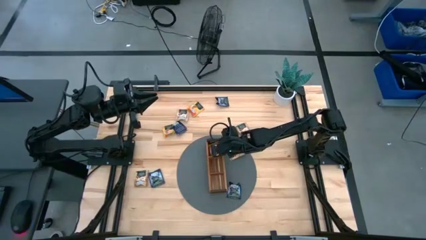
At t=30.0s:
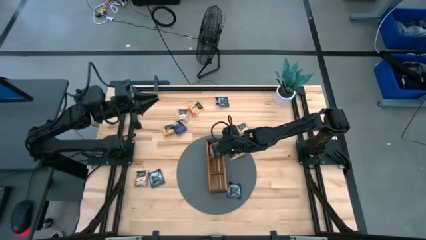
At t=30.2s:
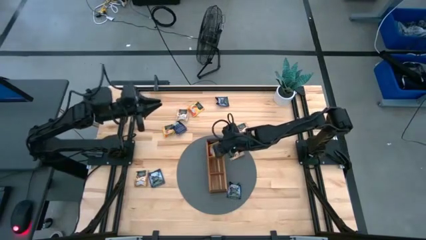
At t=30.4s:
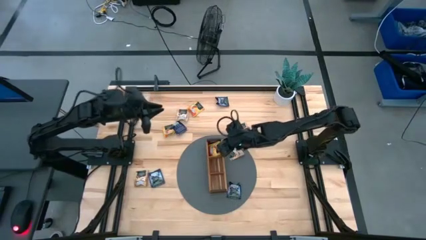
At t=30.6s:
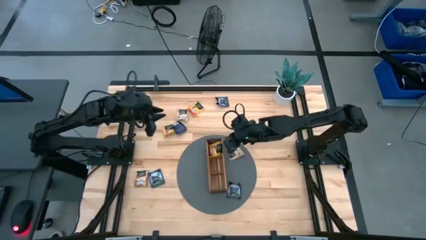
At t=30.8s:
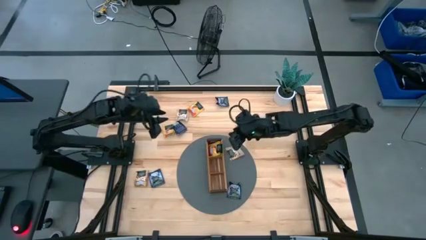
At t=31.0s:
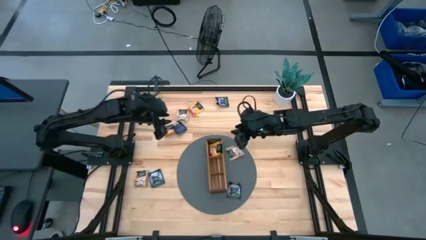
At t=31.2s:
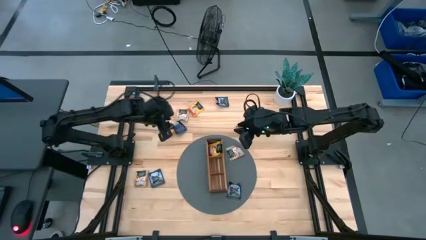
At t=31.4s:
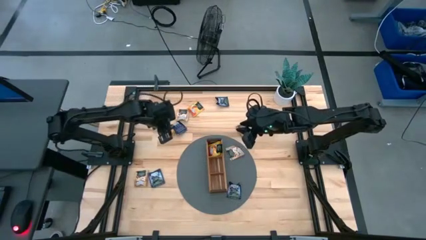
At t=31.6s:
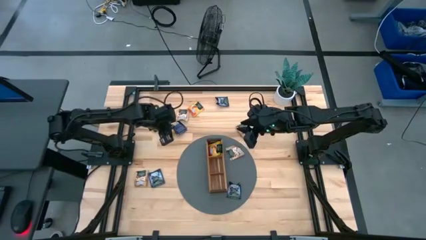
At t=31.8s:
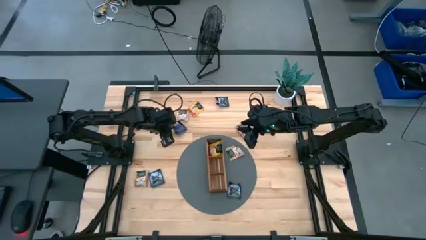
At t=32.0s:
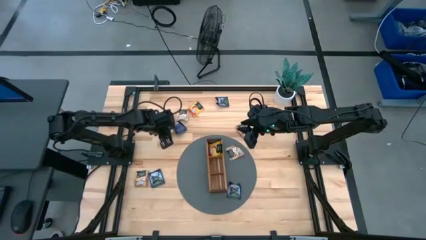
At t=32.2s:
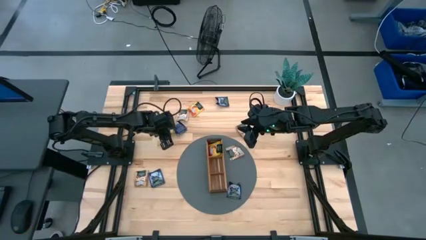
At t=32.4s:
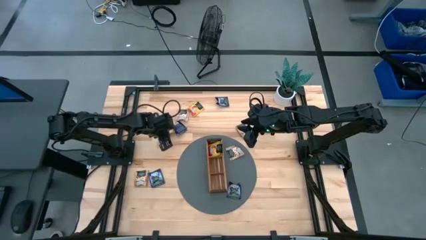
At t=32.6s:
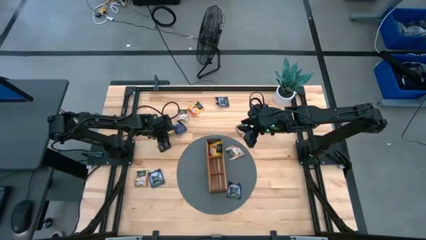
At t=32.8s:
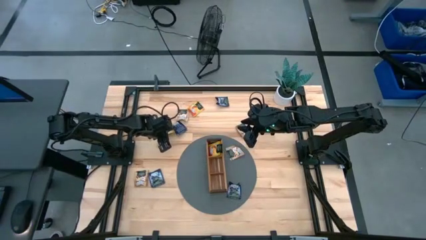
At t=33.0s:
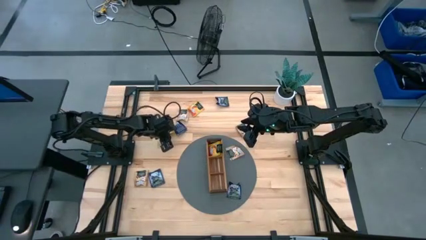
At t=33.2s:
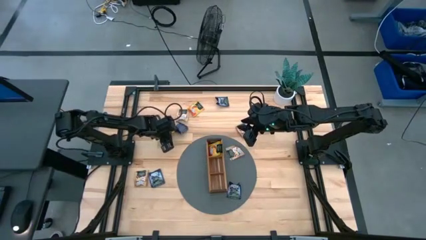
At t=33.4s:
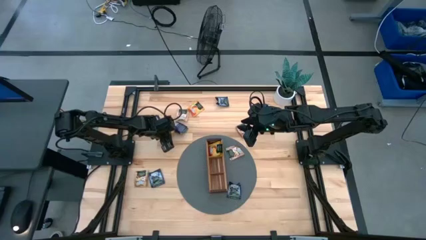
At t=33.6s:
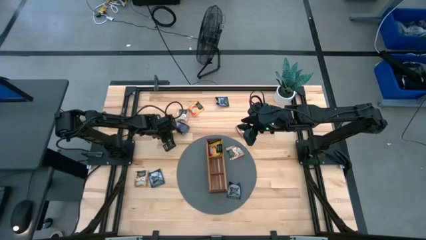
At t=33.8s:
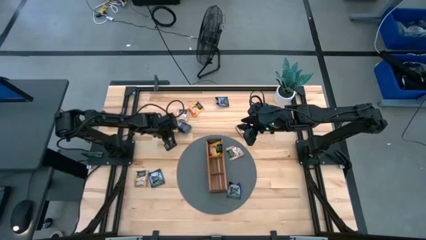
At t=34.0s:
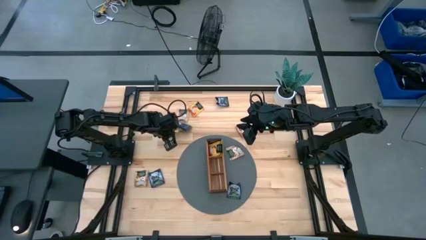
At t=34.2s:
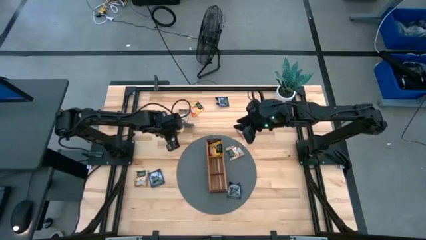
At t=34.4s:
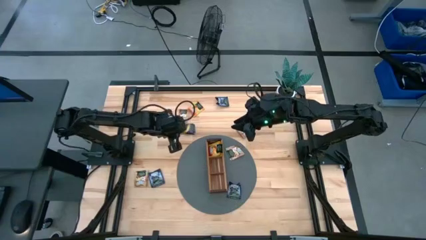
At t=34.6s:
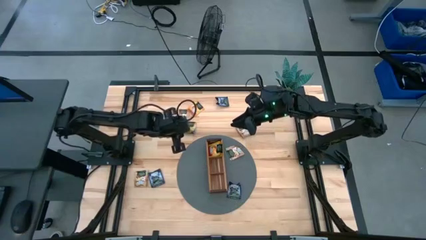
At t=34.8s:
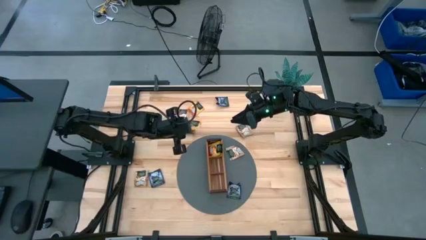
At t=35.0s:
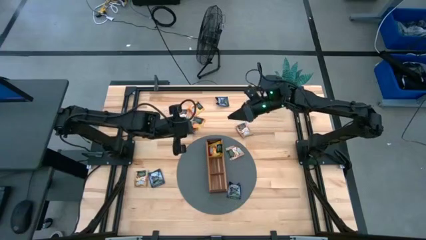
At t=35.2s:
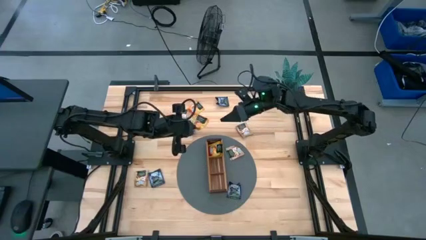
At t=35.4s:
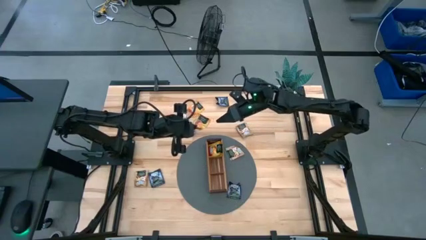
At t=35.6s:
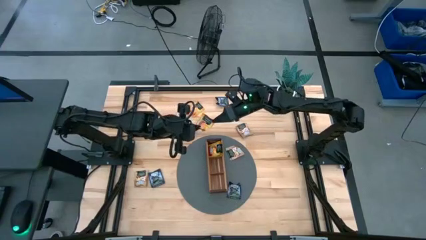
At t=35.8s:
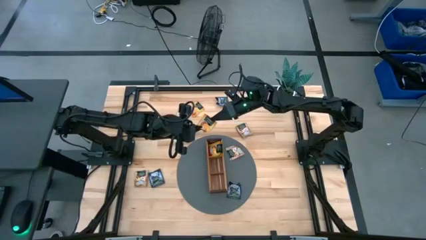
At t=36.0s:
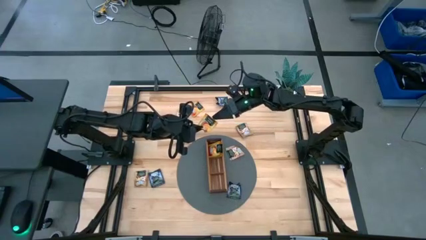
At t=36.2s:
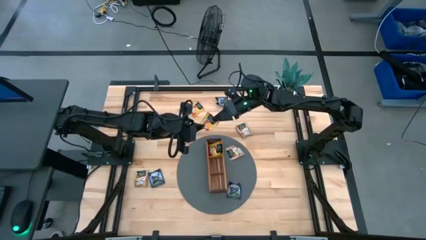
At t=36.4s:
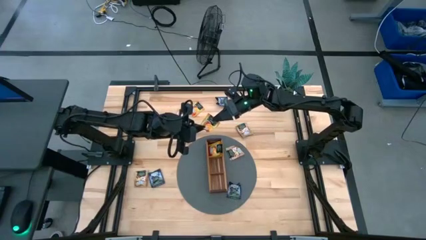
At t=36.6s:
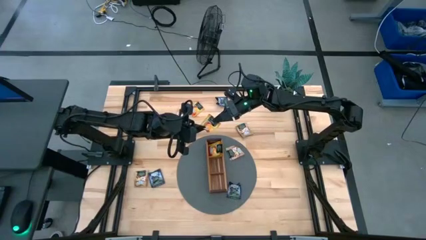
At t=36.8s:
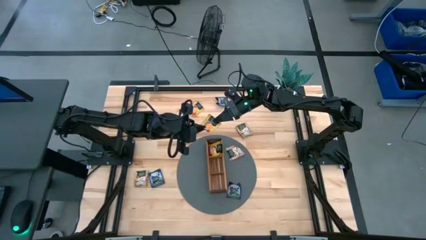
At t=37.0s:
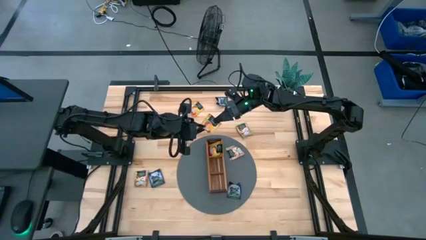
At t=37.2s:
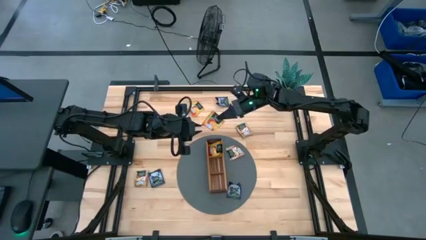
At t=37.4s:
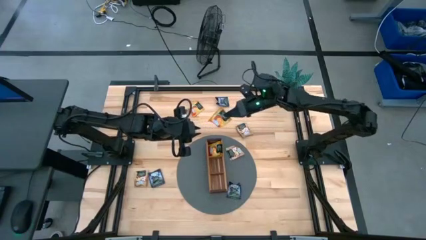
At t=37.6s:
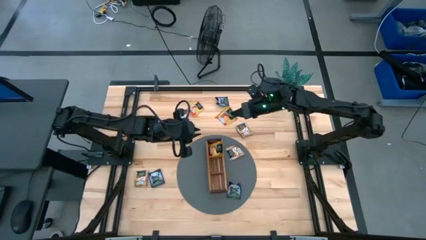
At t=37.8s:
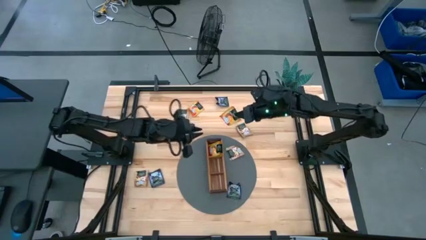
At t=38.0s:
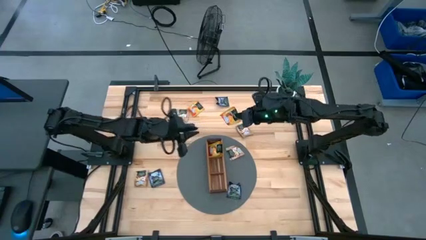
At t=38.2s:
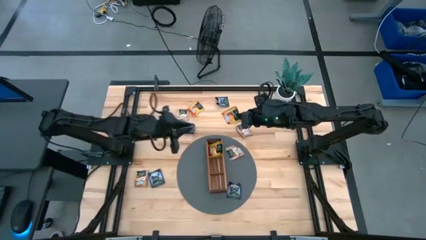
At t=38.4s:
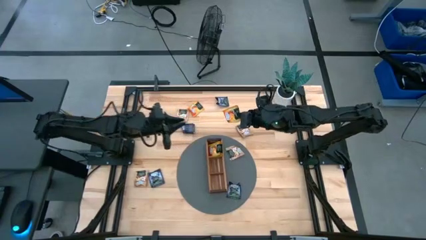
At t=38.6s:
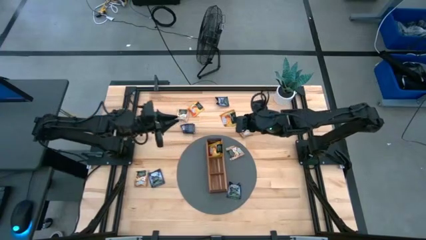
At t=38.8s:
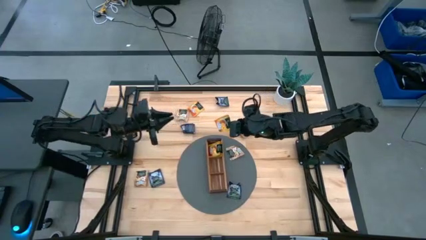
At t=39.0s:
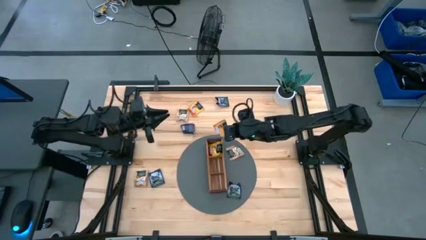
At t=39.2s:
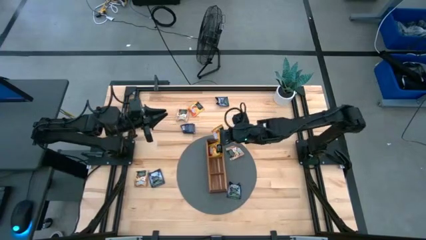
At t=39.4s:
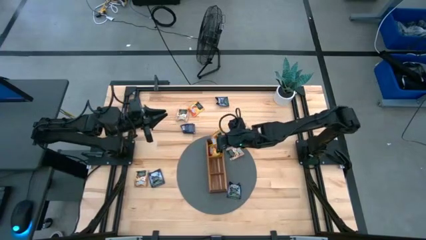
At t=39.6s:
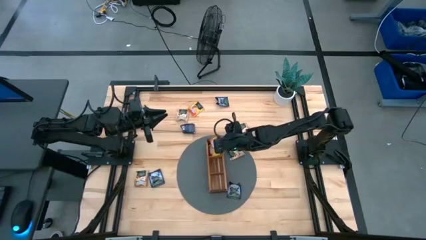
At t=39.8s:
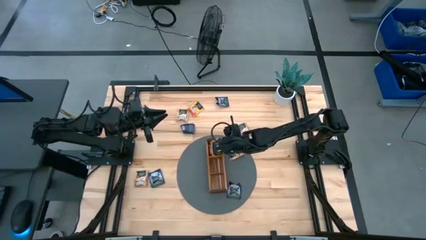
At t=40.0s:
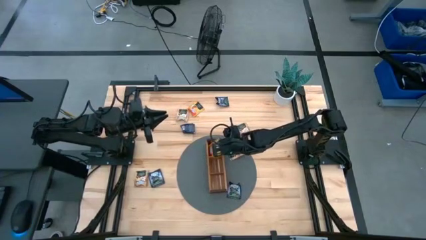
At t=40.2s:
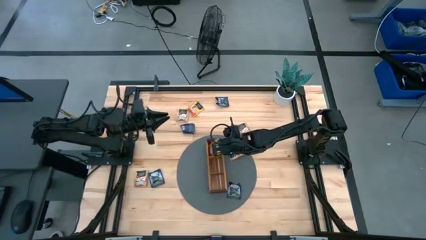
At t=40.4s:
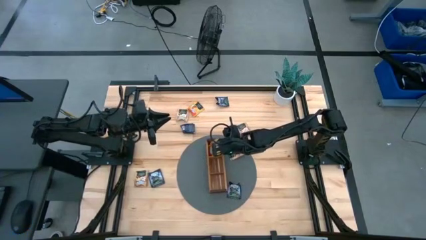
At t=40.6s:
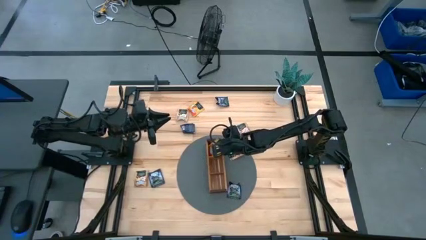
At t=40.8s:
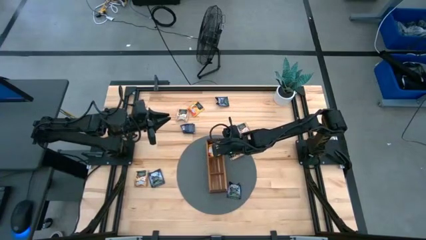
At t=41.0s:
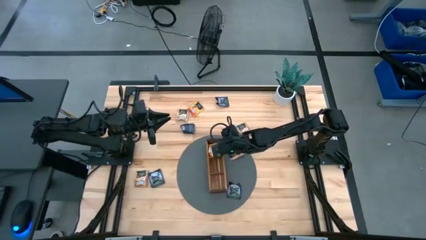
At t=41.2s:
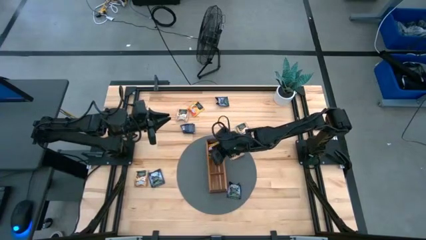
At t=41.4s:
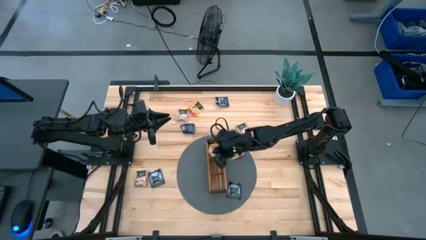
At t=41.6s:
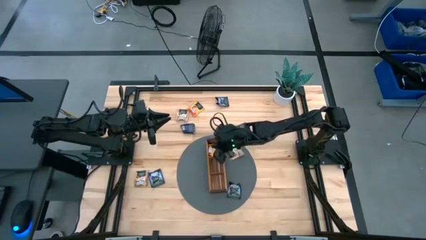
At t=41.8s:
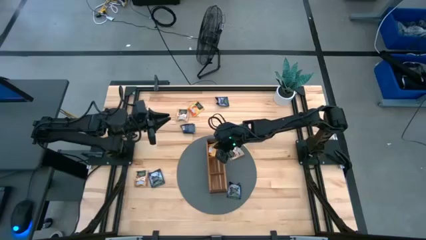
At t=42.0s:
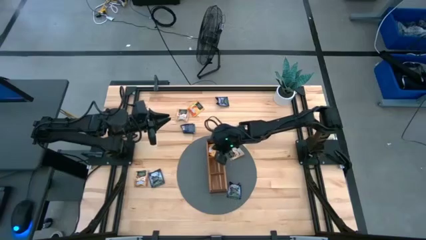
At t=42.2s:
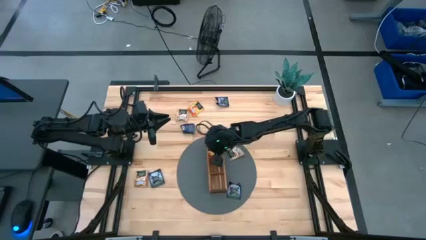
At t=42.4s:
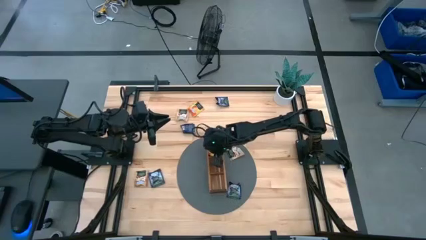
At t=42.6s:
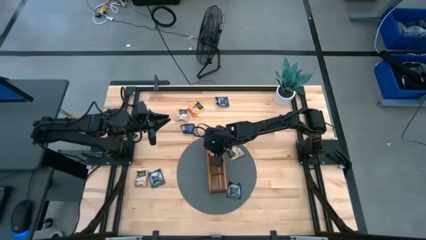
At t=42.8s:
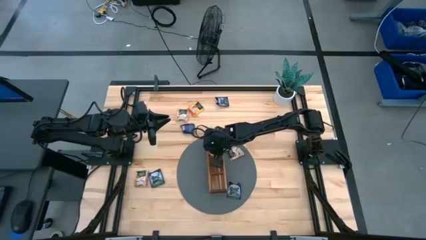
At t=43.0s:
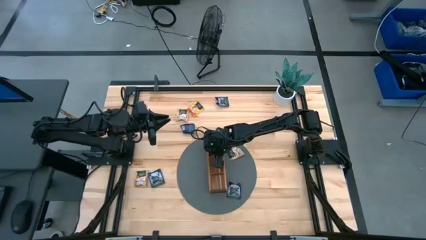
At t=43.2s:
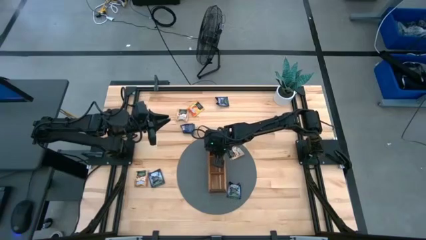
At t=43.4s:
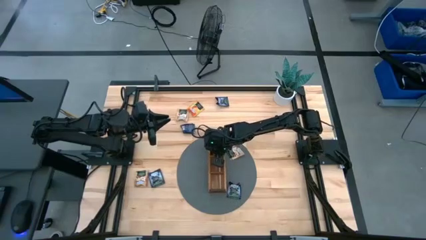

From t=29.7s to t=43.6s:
Task: Pick & Place Tea
Put the orange tea bag into the top section of the wooden organizer

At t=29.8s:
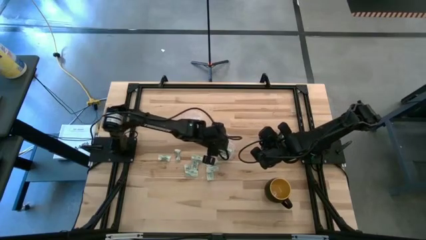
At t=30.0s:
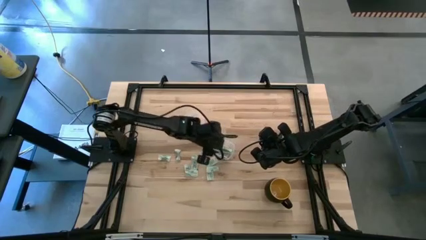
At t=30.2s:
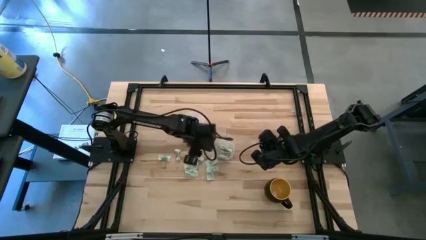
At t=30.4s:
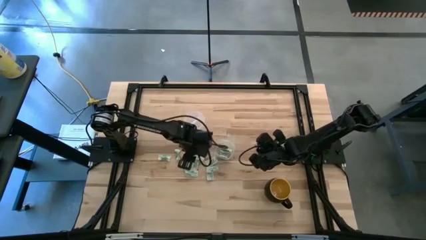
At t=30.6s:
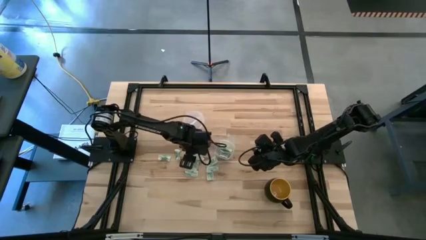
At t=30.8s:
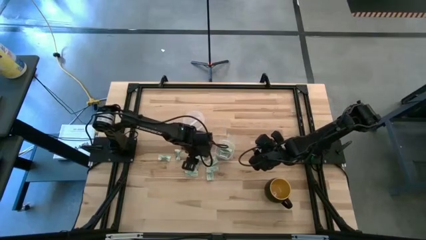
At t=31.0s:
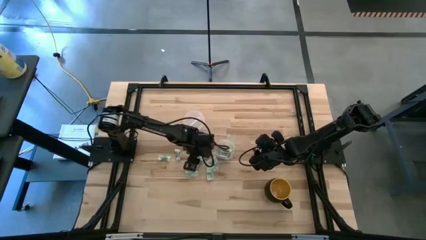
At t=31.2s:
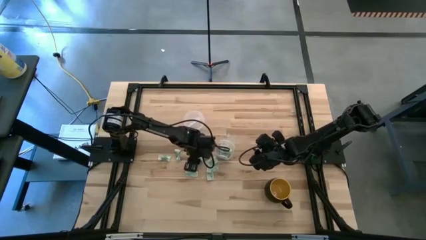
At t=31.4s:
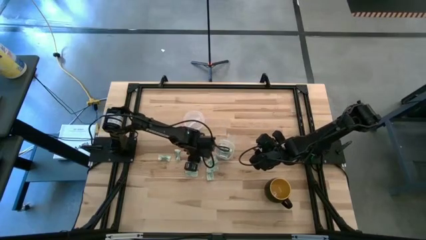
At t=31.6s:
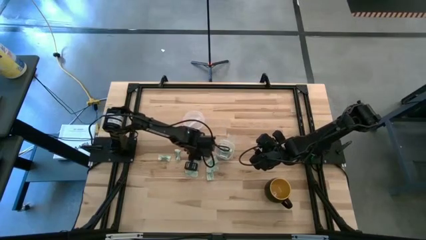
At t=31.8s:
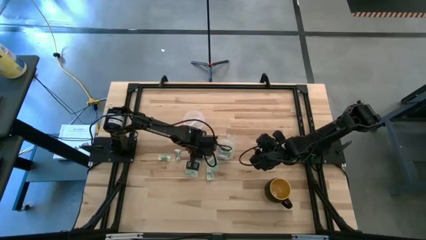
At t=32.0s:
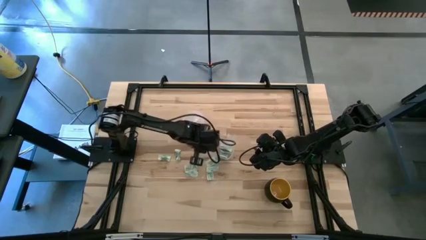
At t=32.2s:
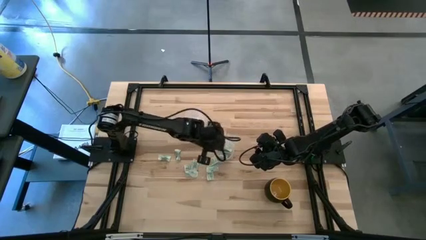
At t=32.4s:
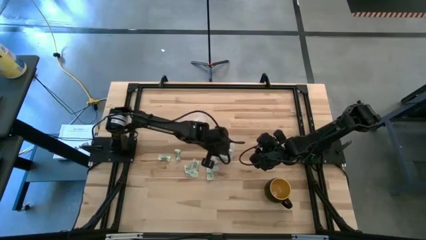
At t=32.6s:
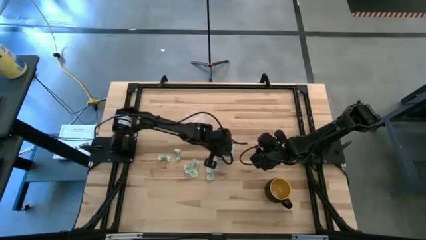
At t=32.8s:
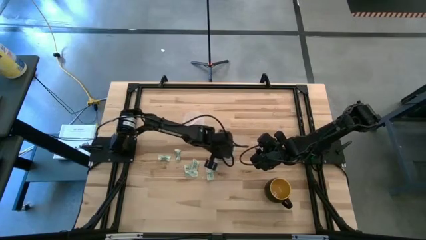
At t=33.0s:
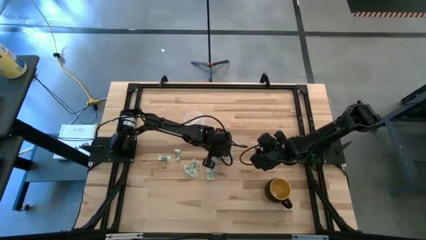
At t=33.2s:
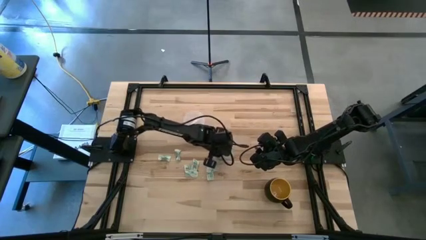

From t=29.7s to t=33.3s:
Task: Pick and place items into bin
Put the light green stevia packet into the transparent bin
